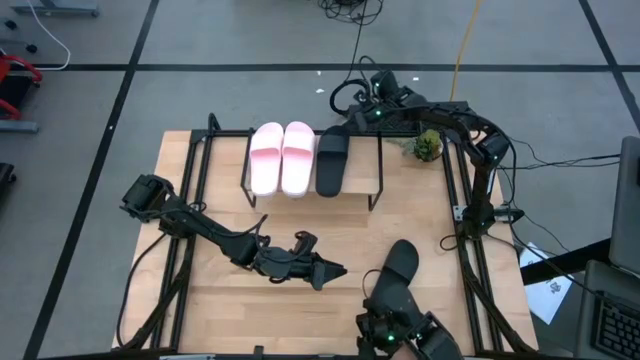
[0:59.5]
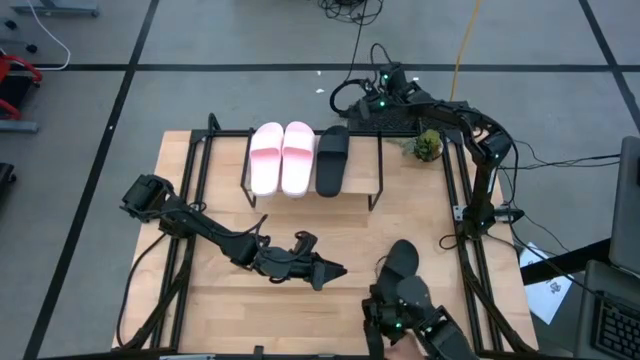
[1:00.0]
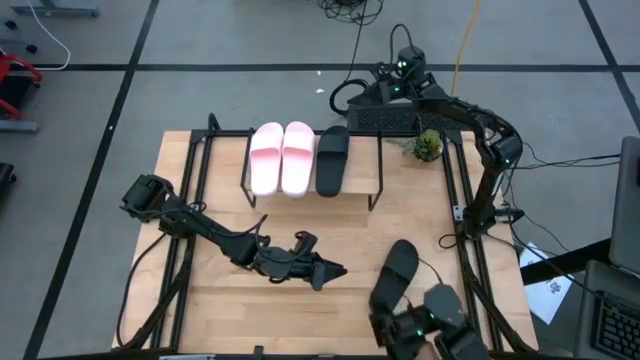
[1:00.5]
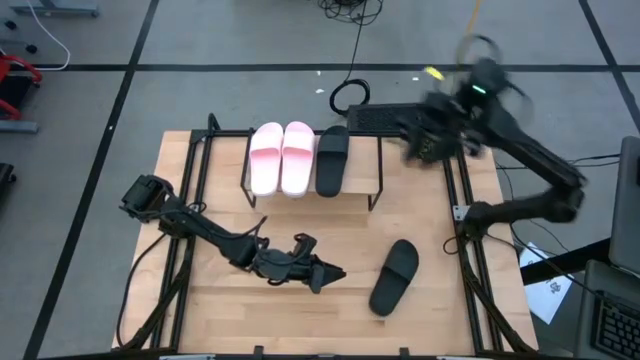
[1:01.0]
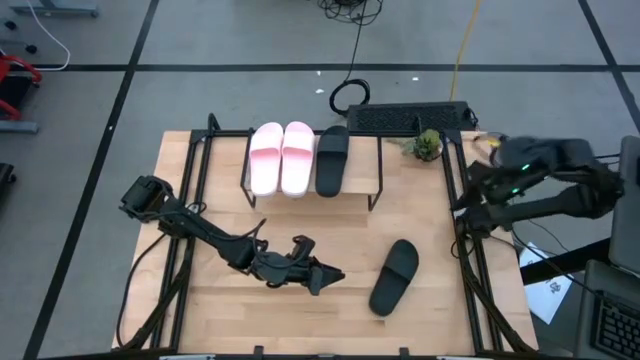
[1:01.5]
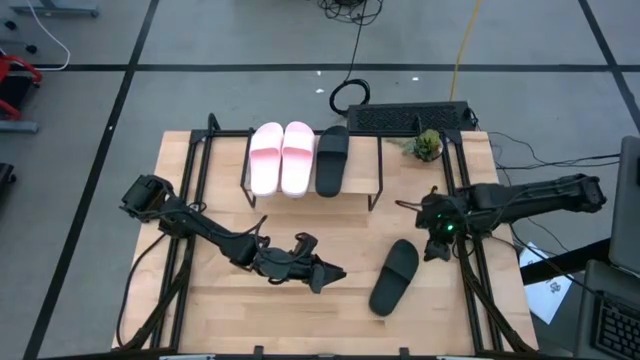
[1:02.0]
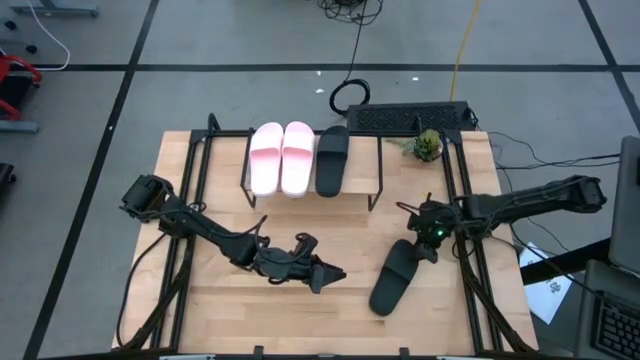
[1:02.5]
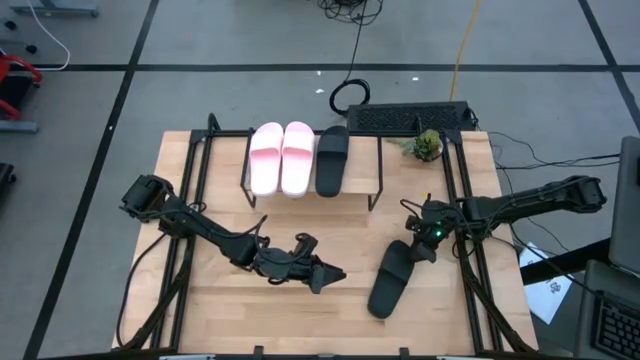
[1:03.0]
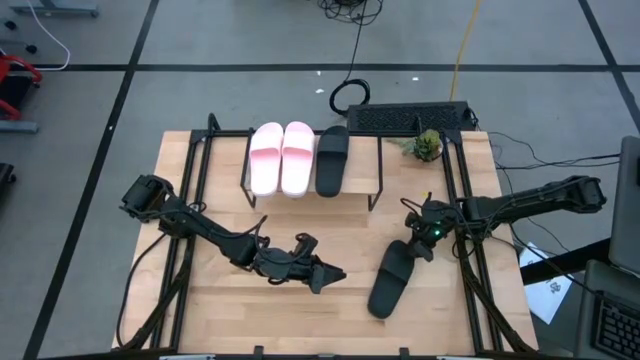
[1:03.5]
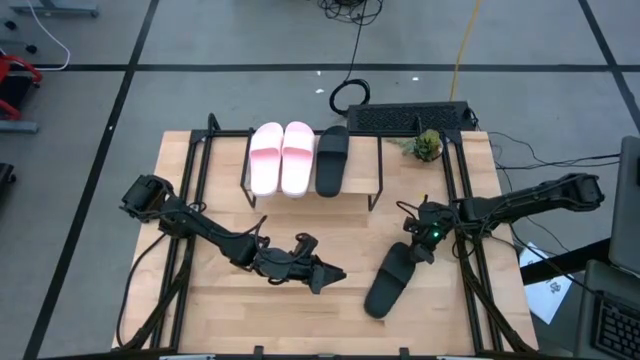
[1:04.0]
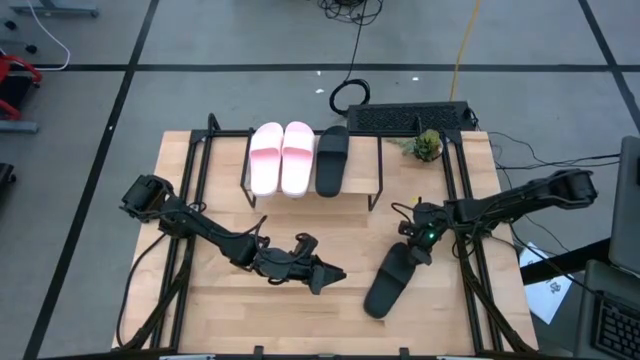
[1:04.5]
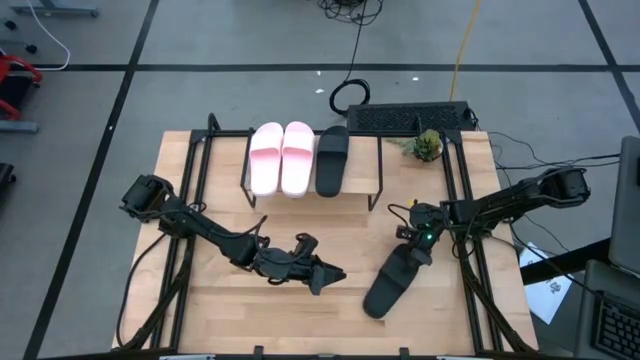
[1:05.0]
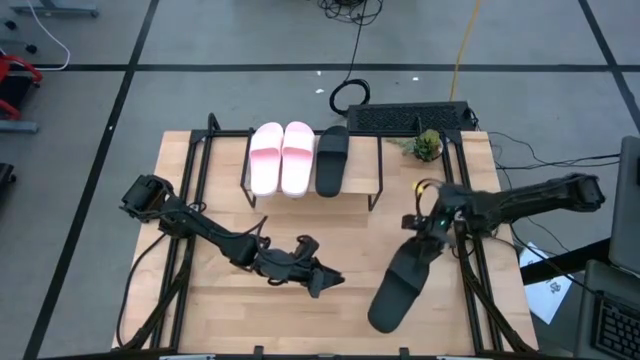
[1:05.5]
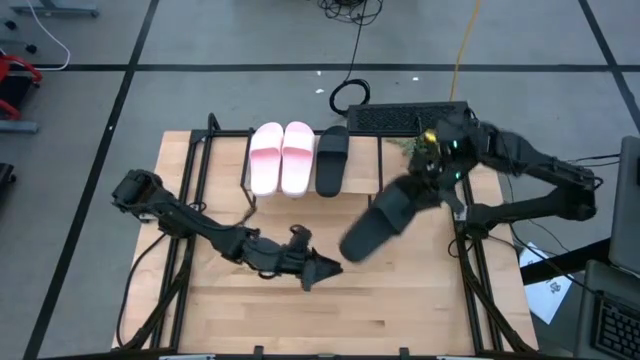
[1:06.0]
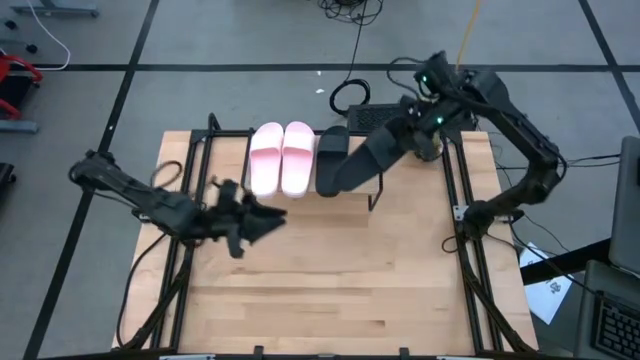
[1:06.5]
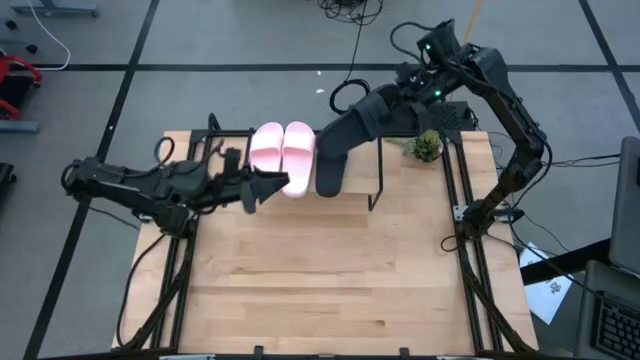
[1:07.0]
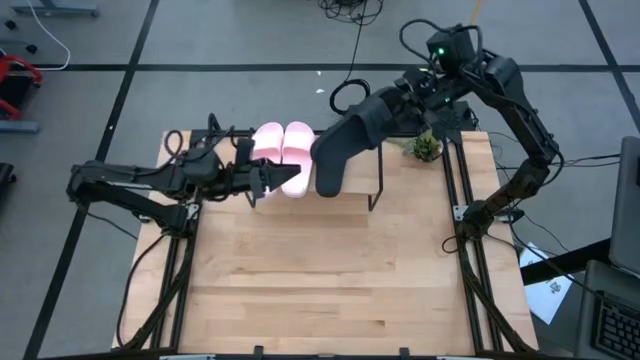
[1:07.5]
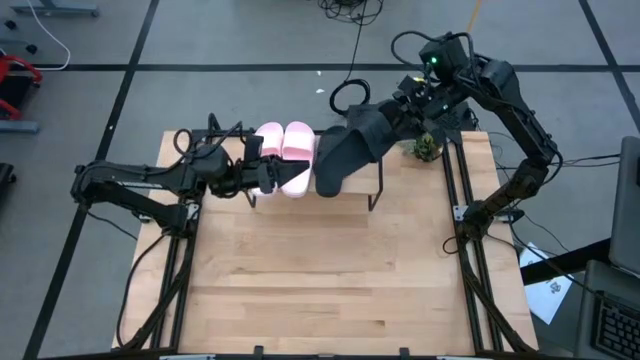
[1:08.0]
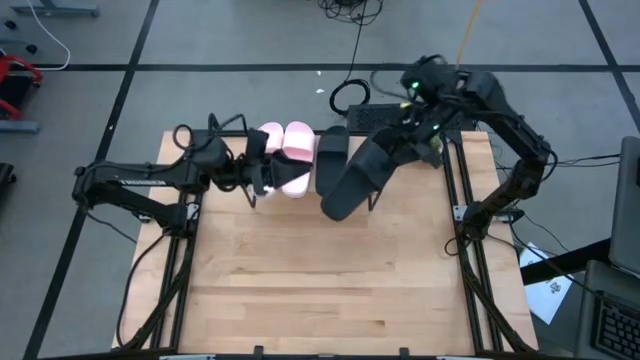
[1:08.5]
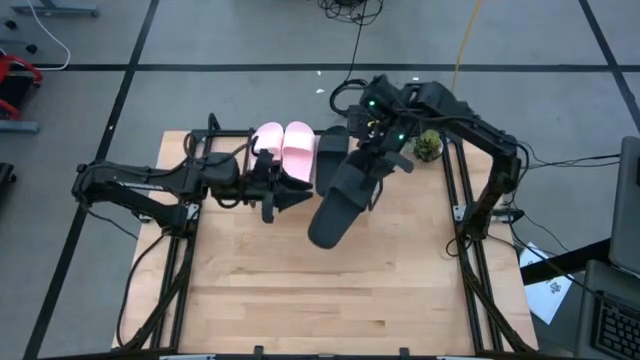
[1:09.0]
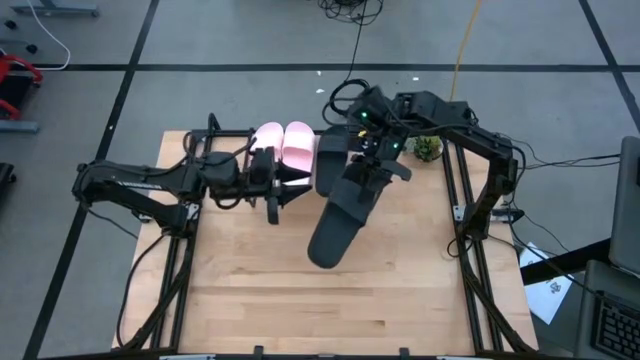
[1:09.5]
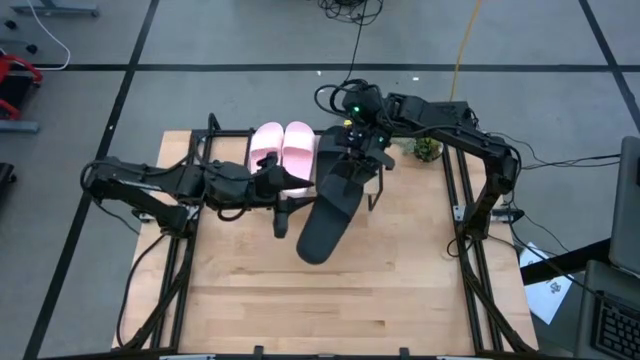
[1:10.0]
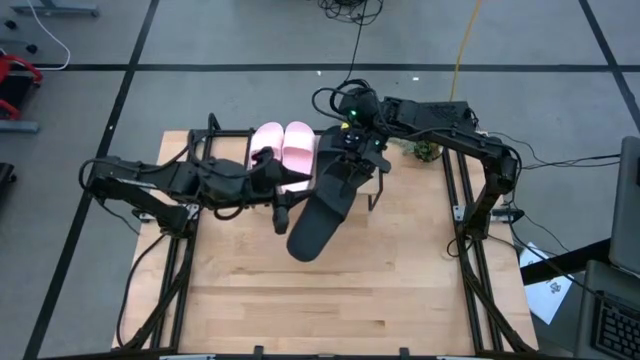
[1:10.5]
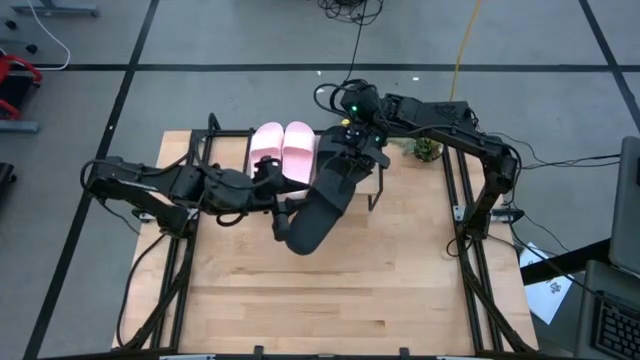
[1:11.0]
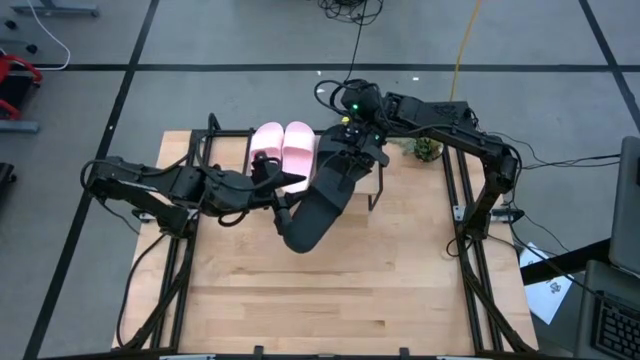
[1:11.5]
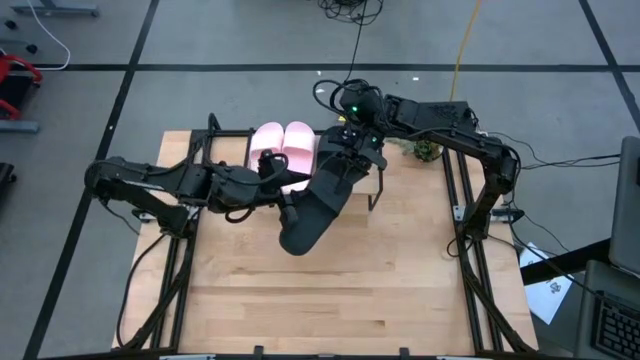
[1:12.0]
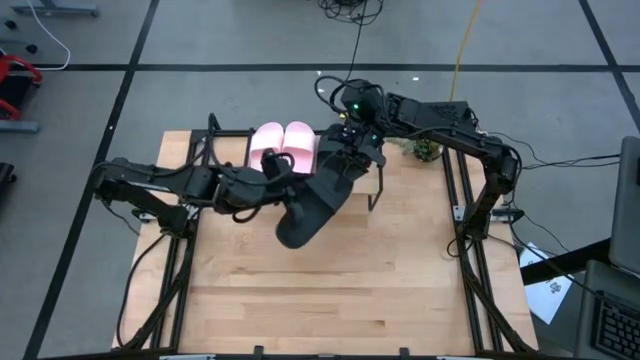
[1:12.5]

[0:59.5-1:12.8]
Task: Pick and place slides into the shelf
Put the black slides on the shelf

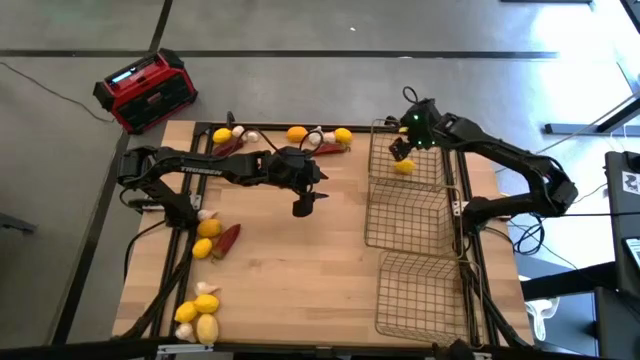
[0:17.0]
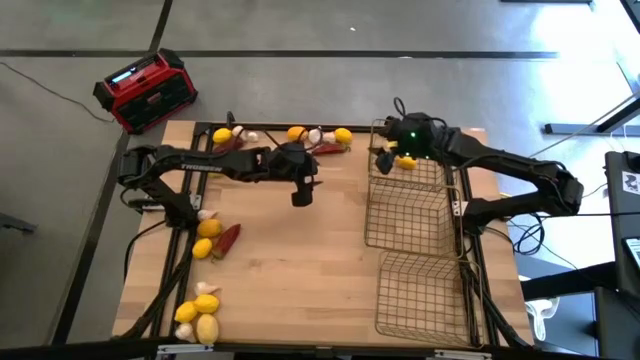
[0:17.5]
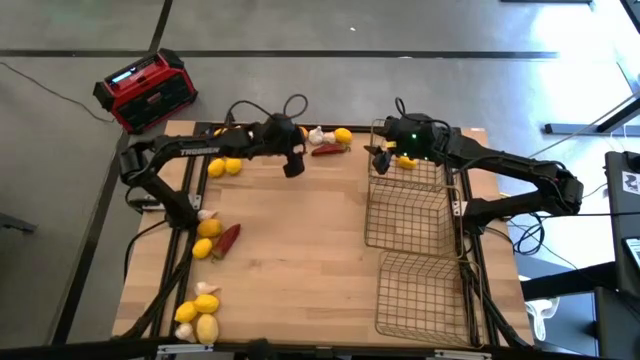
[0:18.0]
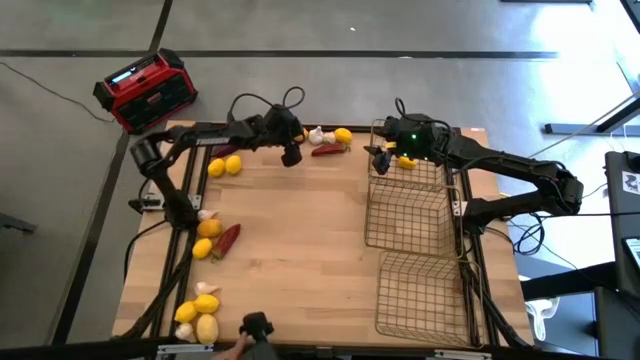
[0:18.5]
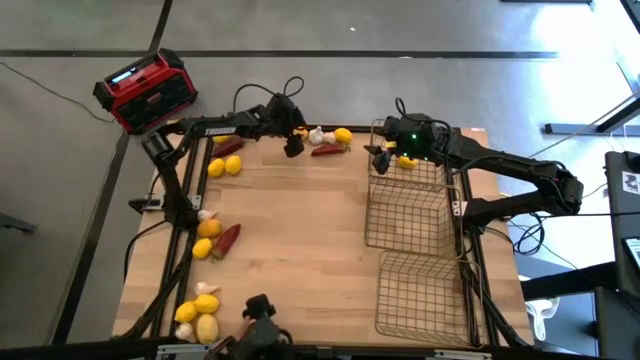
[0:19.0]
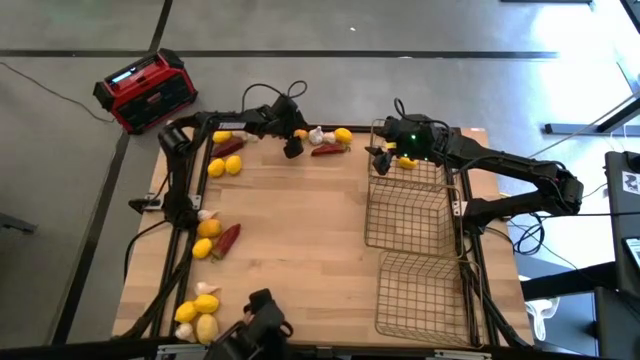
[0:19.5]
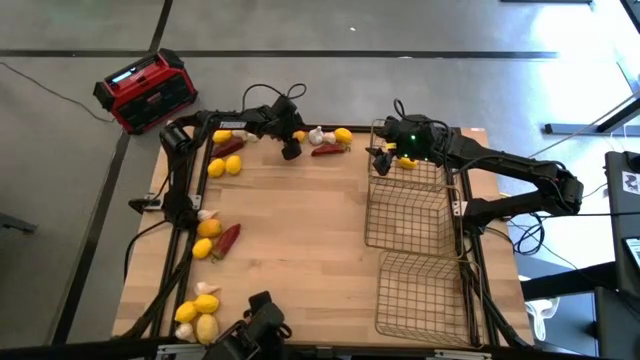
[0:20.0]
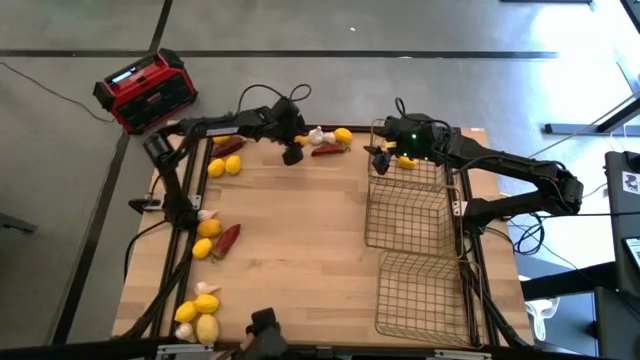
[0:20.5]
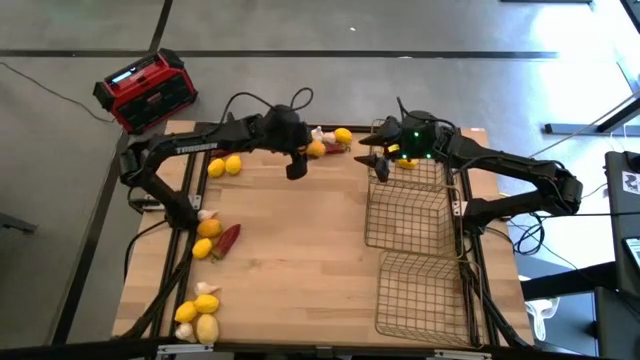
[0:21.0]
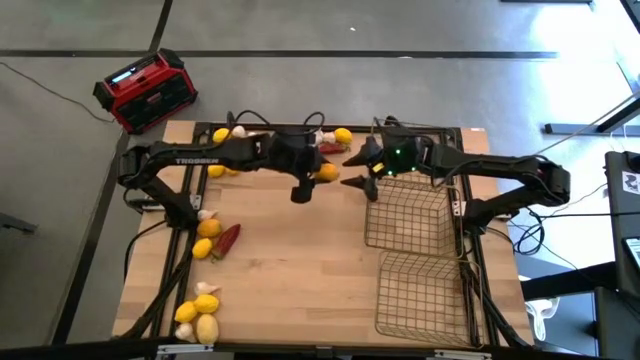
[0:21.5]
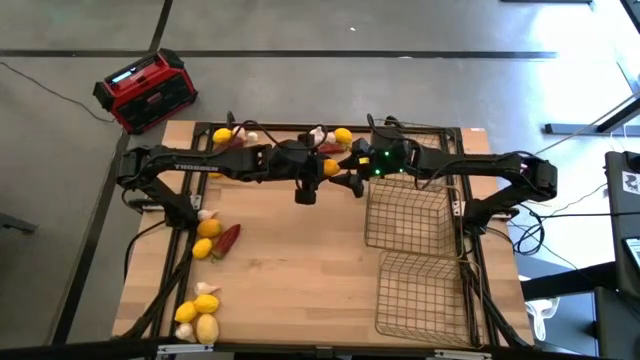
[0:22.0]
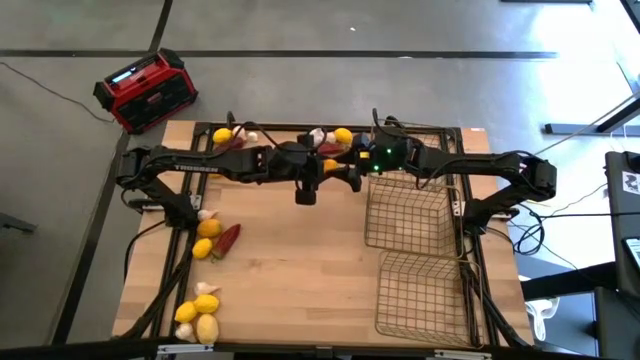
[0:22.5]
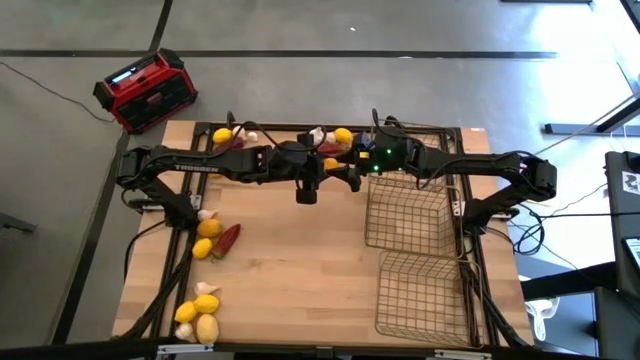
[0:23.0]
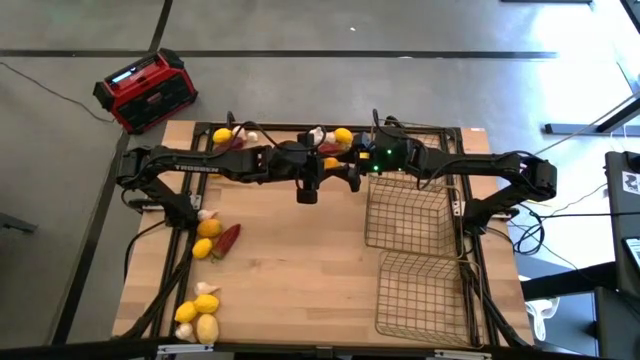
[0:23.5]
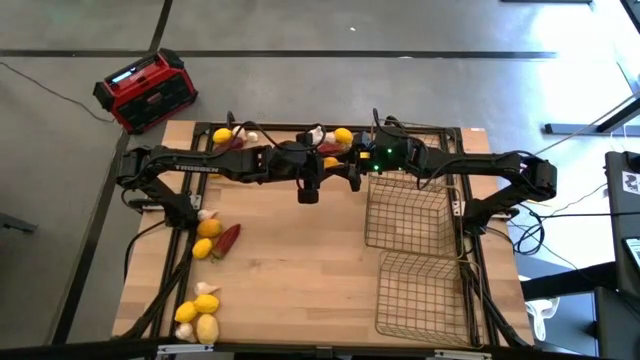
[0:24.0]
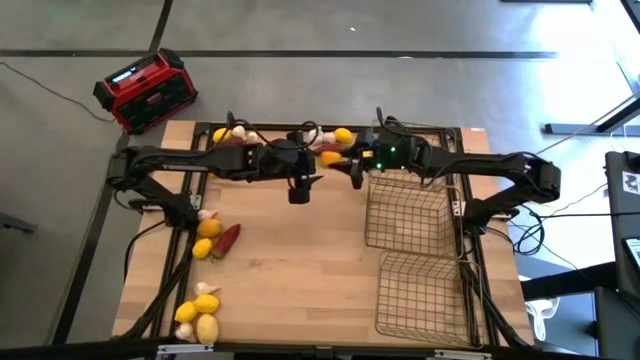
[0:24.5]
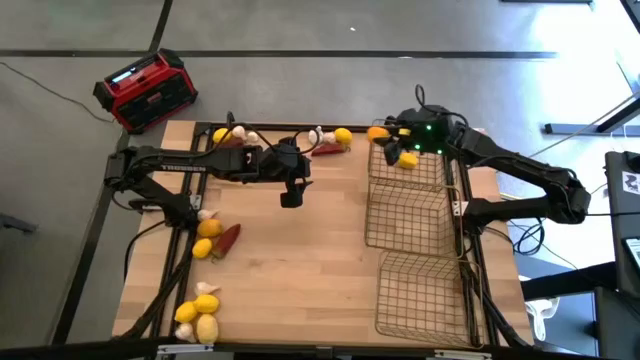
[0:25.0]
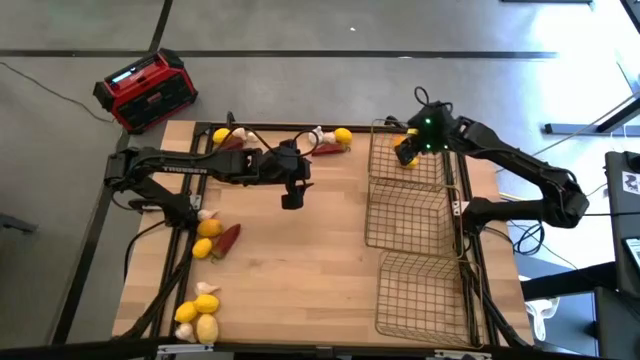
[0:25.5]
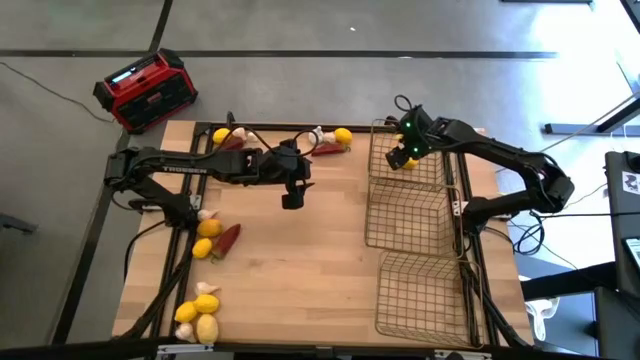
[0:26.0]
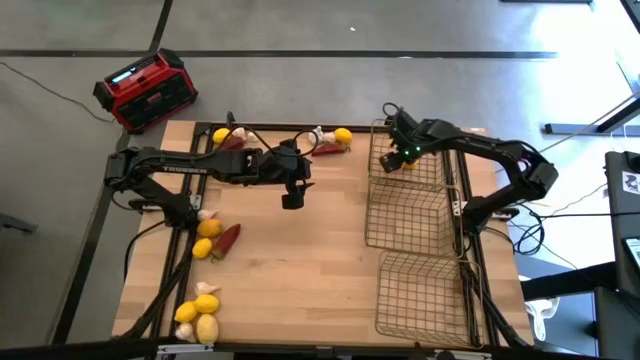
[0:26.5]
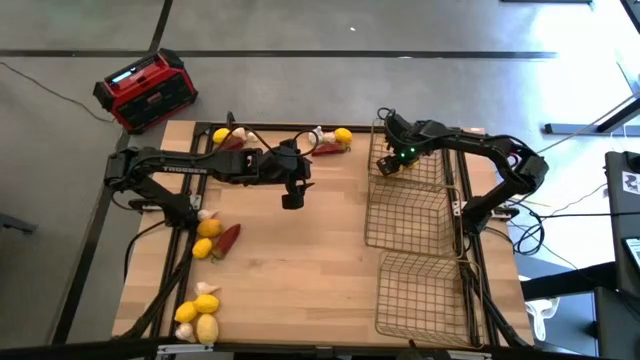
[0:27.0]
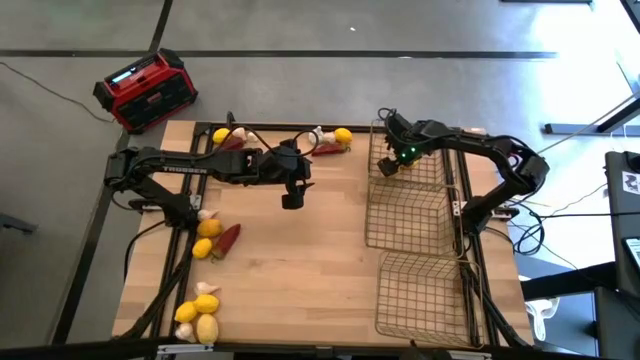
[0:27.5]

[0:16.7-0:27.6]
Task: Sort produce into baskets
Put the yellow lemon into the top wire basket
